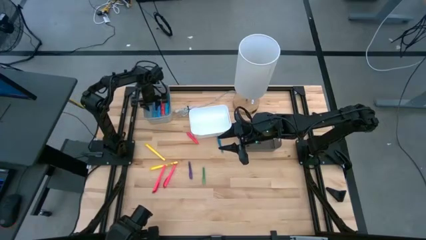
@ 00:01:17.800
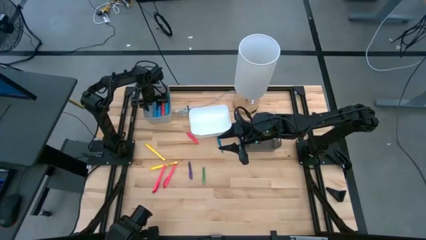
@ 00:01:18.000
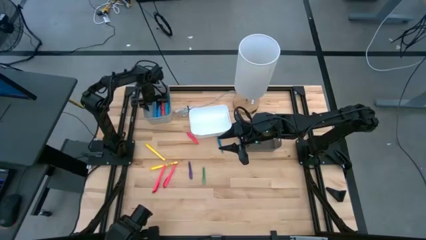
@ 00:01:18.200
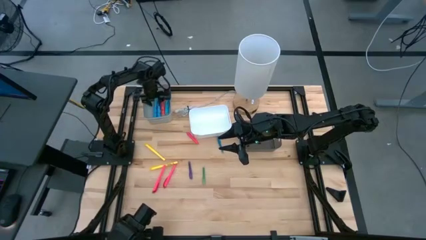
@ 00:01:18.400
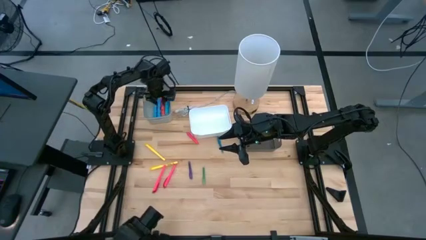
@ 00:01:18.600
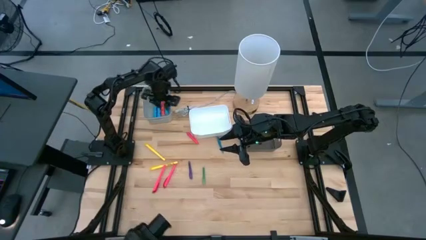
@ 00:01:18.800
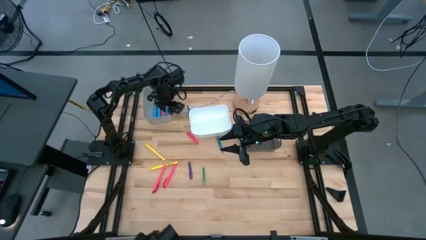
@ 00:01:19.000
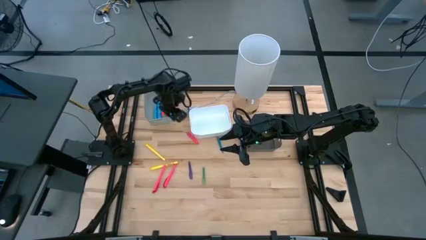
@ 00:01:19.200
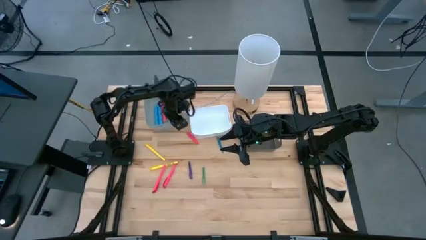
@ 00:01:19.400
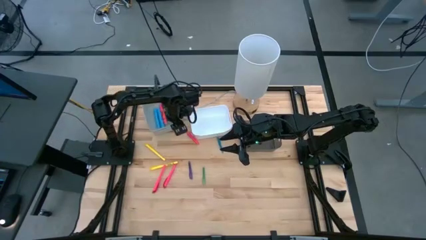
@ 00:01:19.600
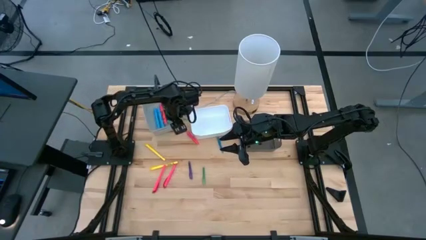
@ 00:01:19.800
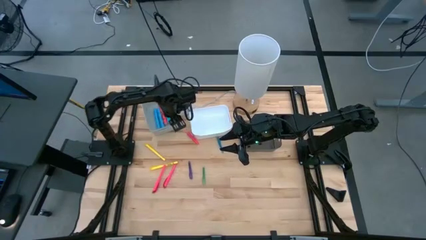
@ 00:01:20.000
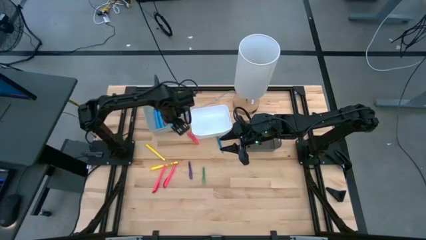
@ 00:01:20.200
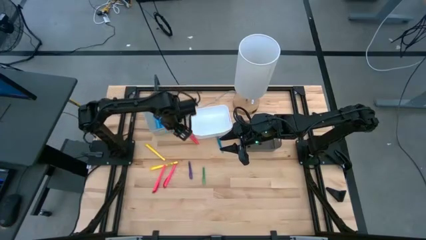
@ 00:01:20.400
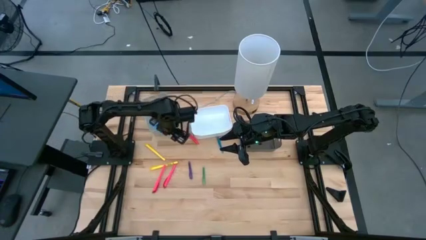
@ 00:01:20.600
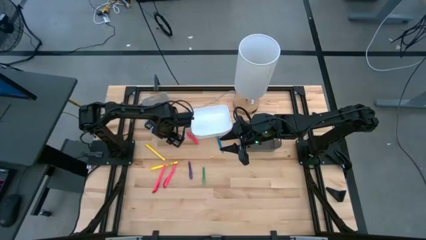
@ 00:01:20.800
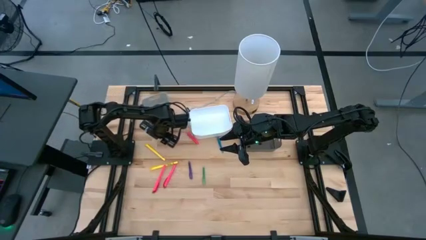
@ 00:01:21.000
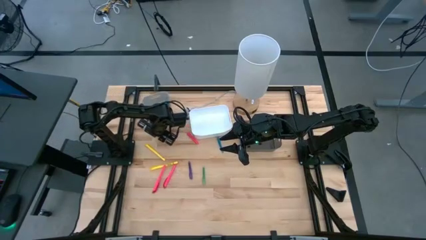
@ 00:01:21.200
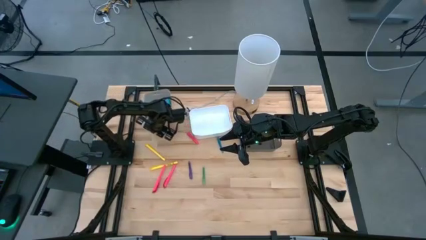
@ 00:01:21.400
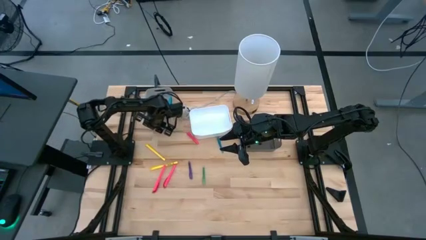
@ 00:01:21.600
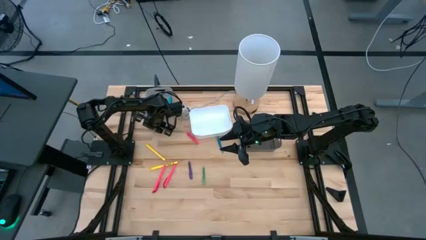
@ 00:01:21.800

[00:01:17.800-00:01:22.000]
Task: Pick & Place Markers
Adjust the gray bin

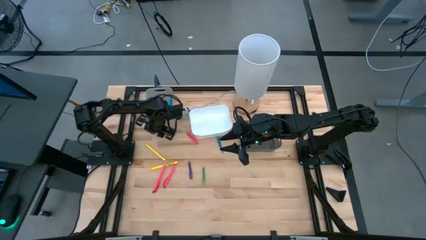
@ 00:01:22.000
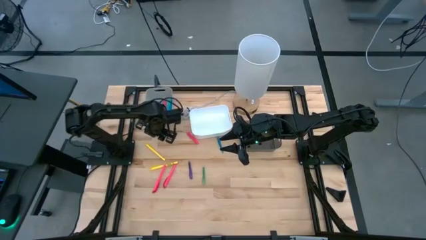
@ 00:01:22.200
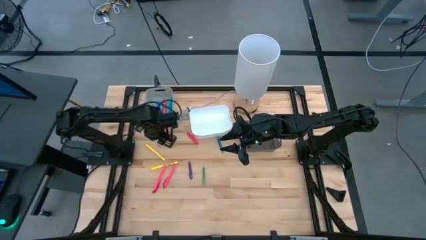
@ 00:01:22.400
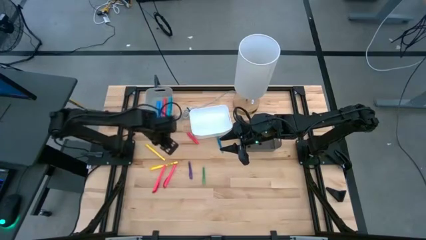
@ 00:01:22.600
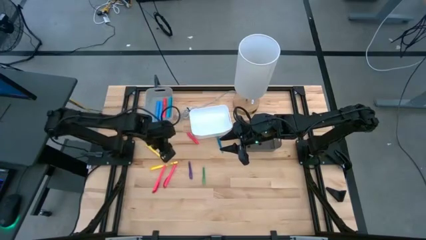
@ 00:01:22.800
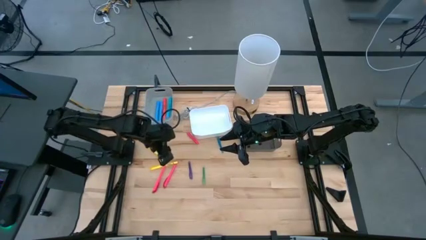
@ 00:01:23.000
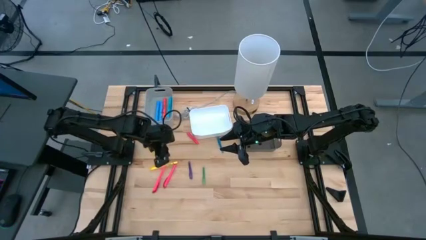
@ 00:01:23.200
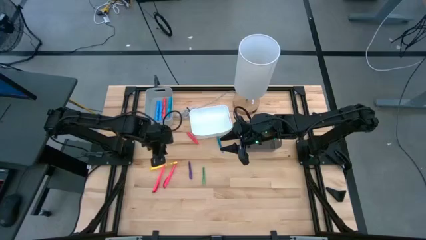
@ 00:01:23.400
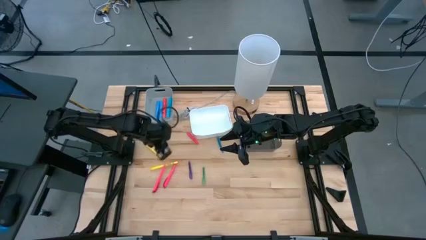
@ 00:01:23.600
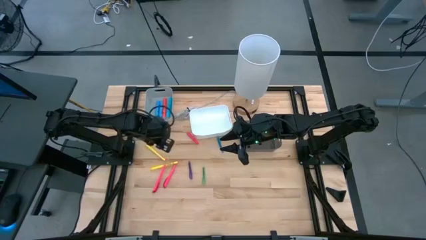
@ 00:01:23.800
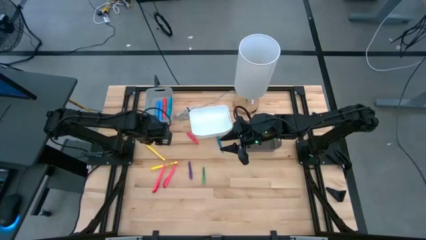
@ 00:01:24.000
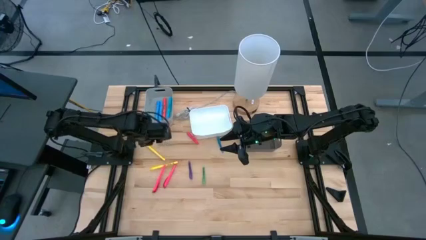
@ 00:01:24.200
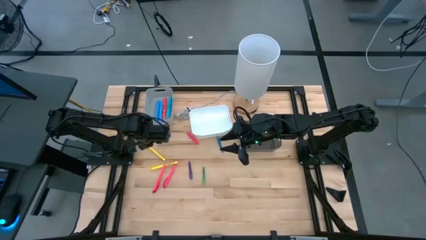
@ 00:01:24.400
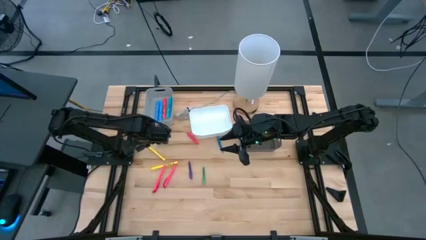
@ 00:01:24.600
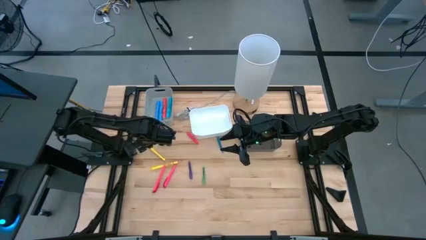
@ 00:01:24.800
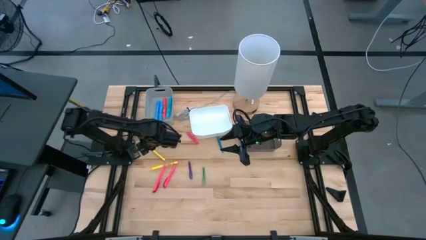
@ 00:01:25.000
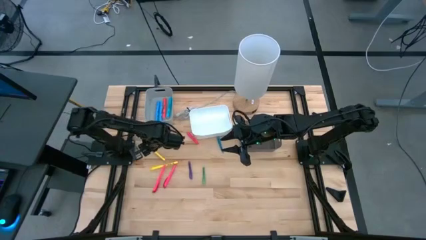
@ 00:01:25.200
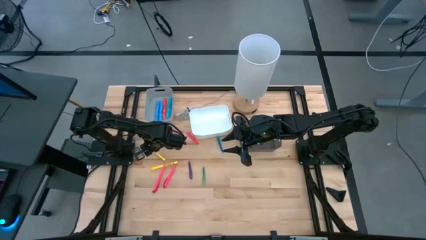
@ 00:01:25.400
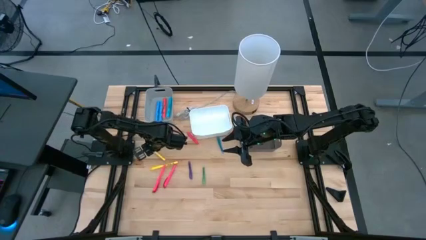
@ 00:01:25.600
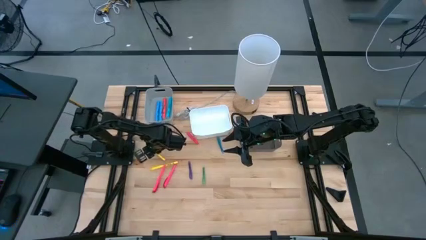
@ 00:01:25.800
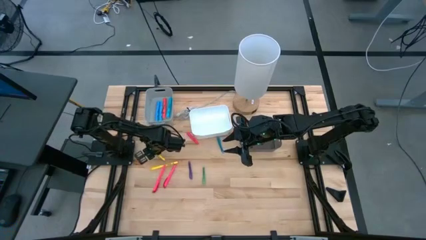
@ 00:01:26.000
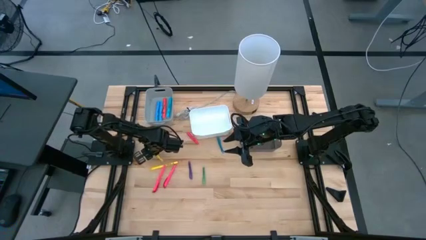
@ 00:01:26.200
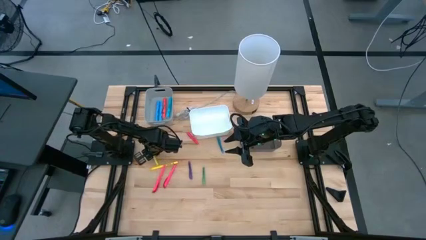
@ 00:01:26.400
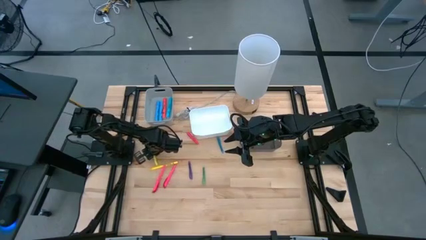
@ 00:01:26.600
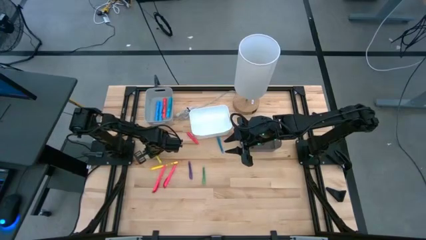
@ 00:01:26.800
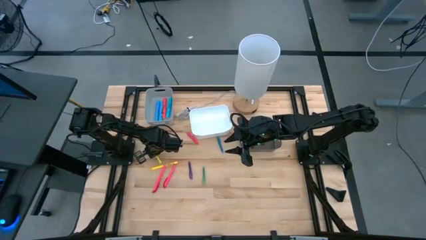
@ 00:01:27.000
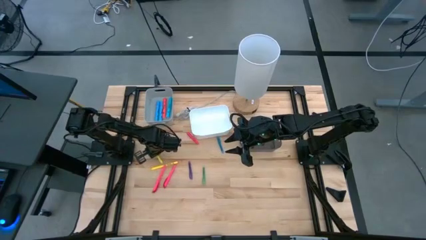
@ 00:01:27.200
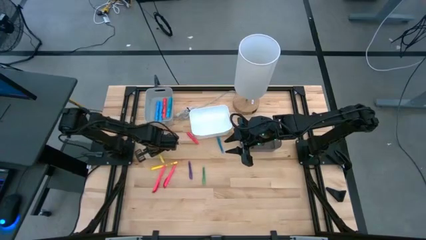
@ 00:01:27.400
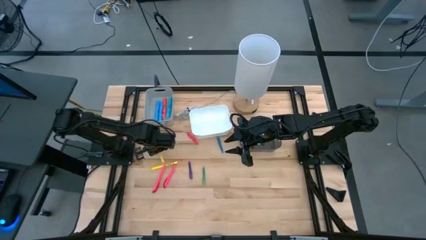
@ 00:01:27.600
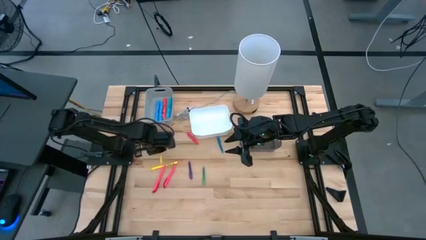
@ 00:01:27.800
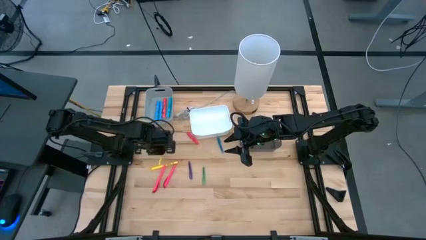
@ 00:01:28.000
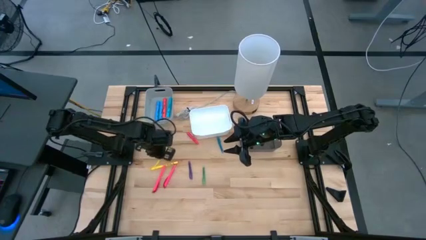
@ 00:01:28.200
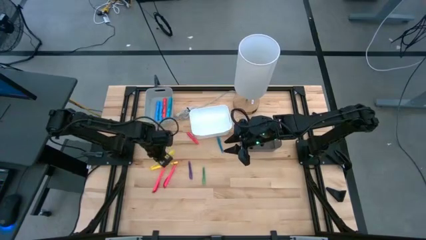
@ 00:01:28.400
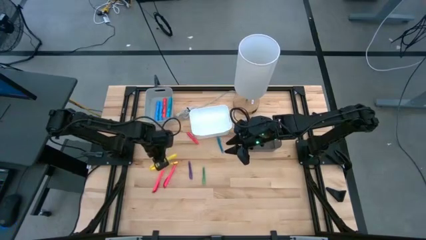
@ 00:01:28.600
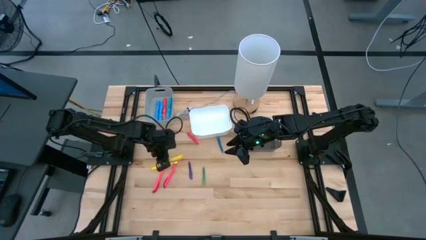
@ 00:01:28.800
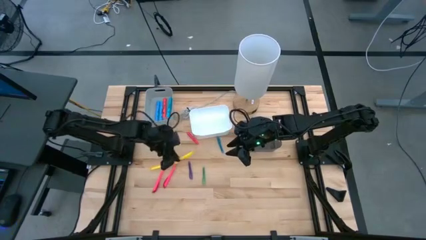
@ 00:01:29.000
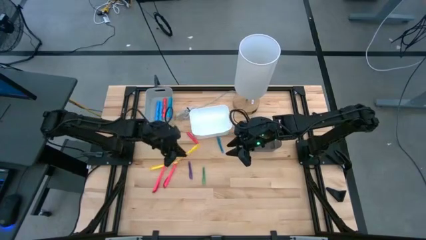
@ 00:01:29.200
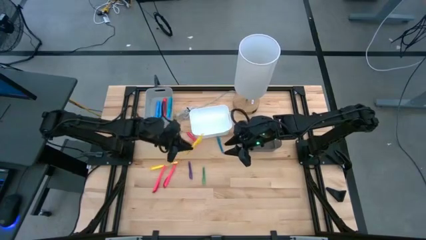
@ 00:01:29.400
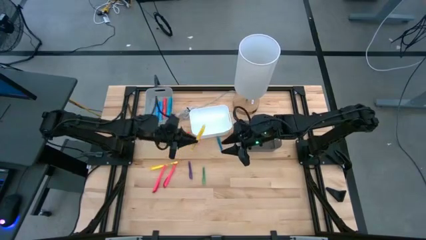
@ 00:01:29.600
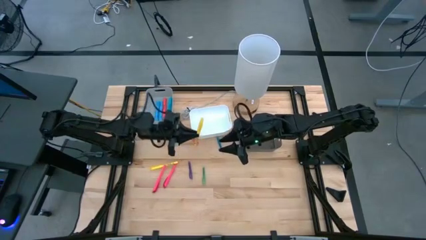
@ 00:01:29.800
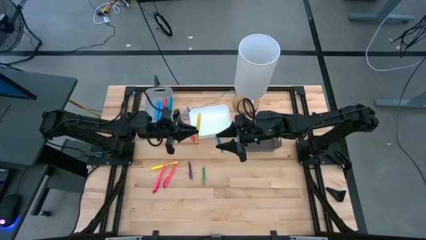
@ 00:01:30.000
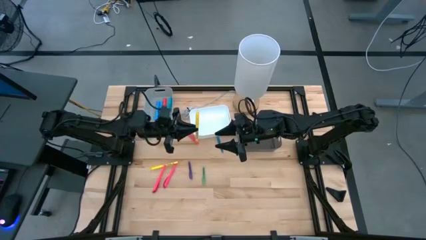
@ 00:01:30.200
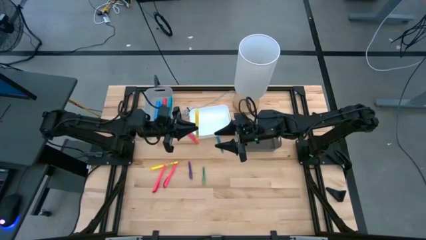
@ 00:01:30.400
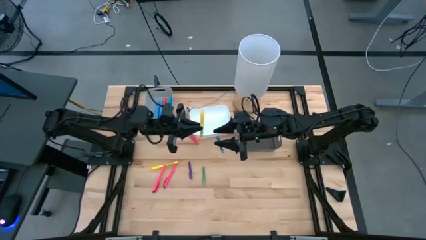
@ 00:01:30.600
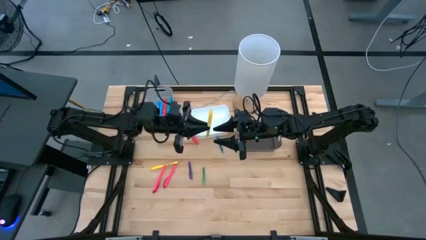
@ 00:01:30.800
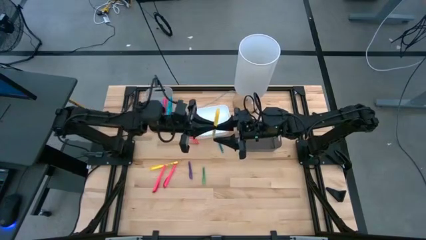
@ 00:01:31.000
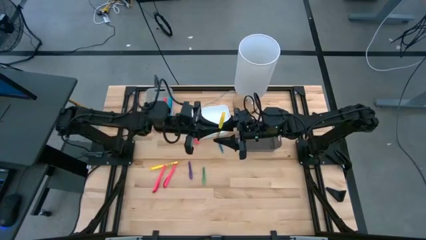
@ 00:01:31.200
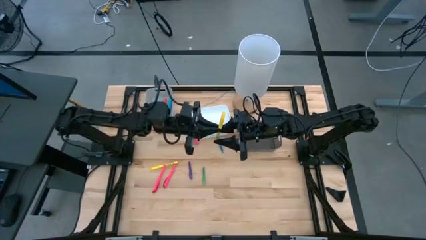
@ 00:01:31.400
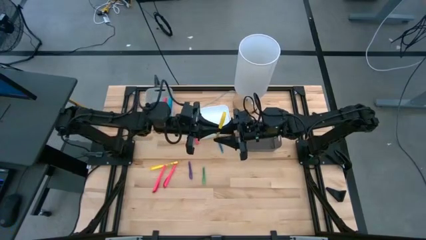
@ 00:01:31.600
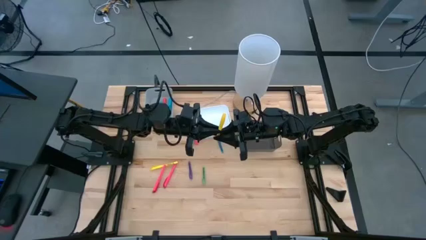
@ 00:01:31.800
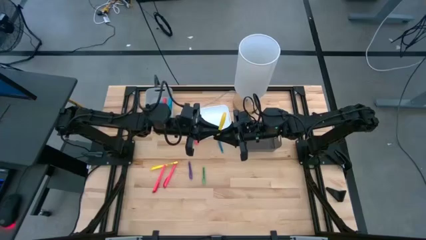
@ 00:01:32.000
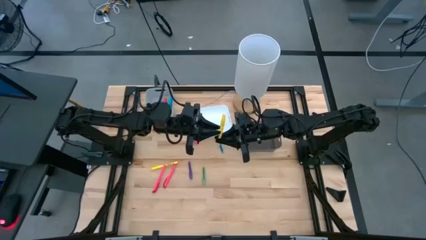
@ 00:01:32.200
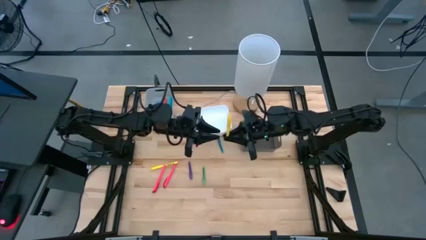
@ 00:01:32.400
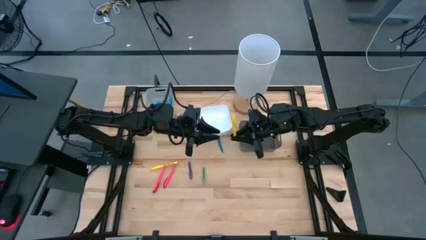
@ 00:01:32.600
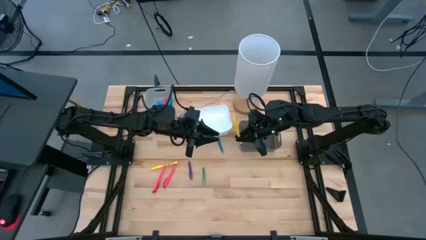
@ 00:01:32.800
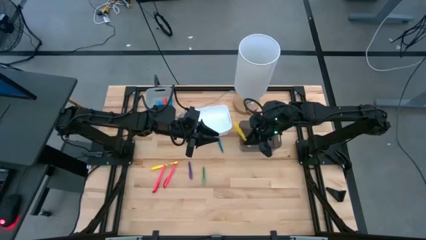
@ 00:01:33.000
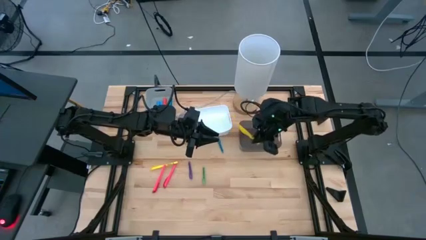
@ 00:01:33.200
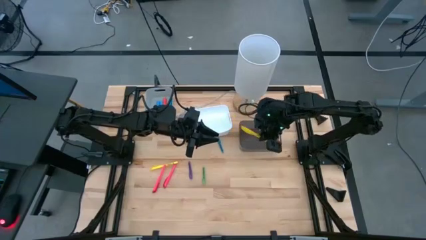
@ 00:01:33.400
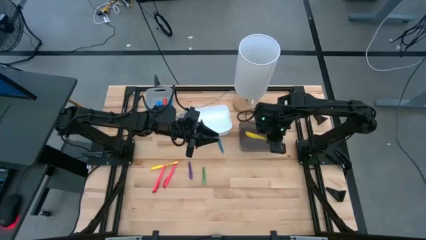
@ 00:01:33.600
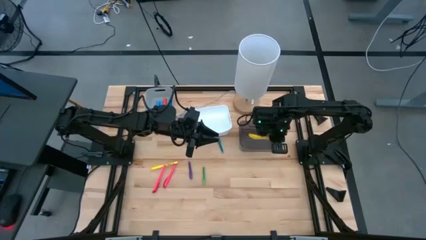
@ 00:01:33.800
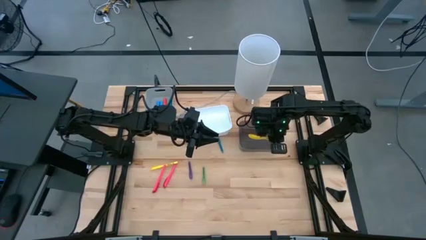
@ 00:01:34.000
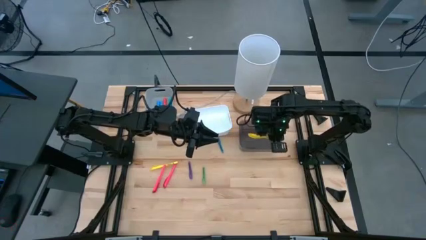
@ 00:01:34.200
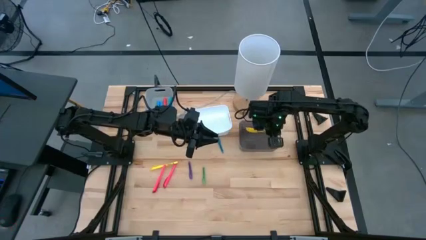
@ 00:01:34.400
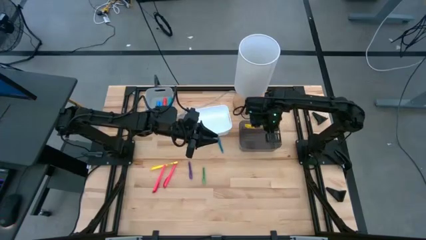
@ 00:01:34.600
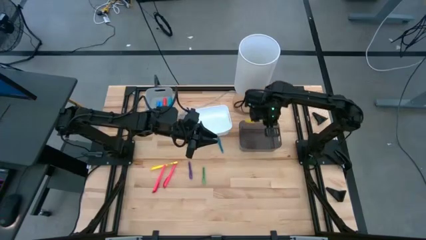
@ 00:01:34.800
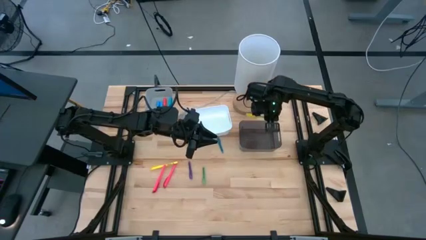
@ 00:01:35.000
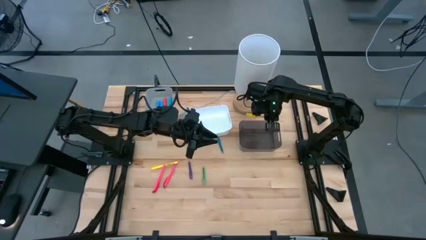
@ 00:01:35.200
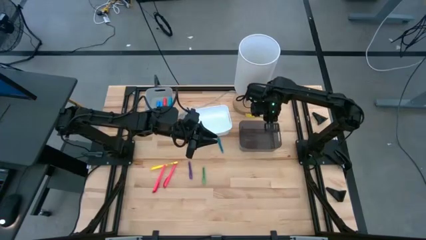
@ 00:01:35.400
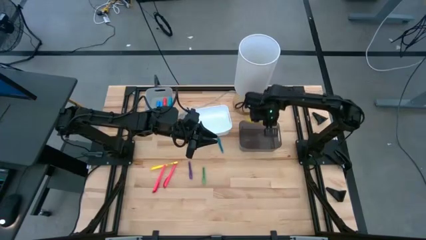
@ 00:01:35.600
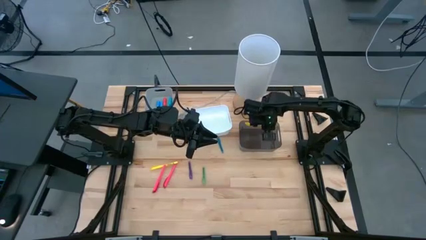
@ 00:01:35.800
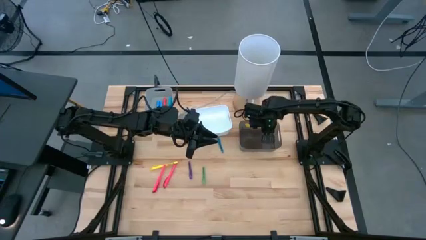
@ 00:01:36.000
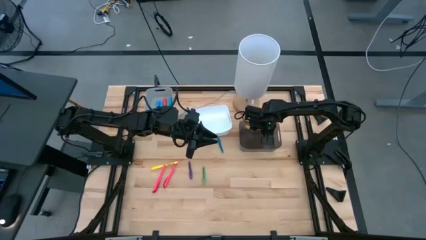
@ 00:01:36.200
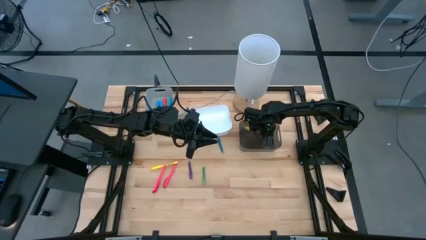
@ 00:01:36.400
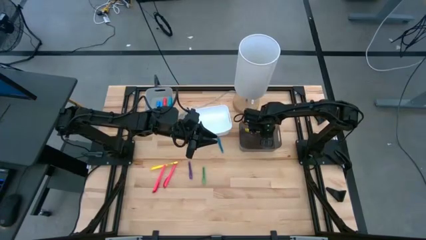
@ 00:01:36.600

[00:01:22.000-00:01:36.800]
Put the top yellow pen into the black transparent bin
